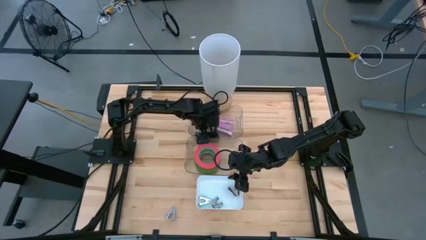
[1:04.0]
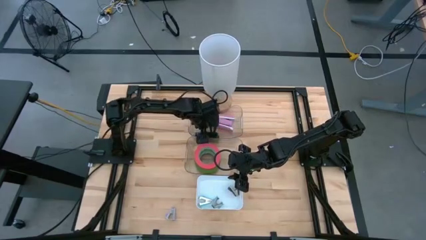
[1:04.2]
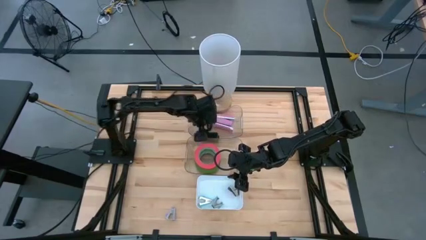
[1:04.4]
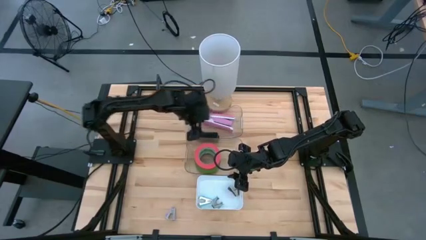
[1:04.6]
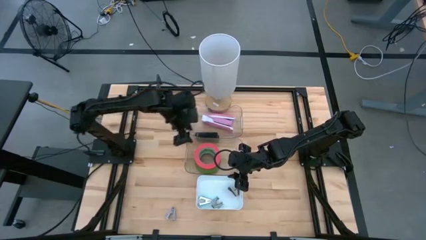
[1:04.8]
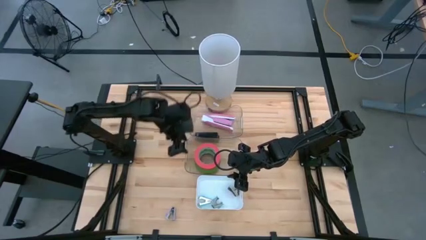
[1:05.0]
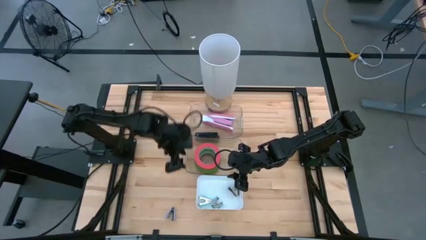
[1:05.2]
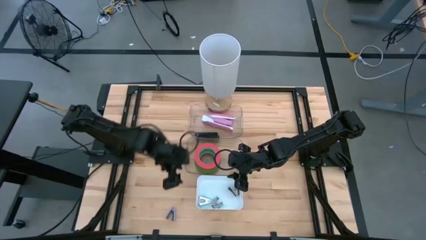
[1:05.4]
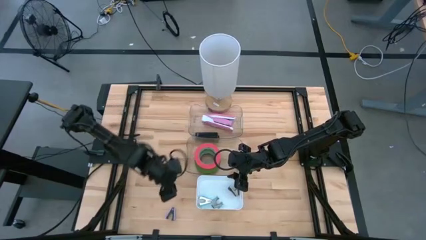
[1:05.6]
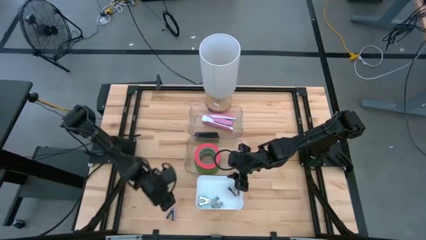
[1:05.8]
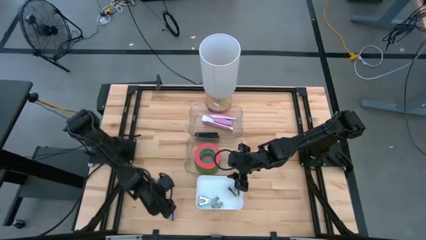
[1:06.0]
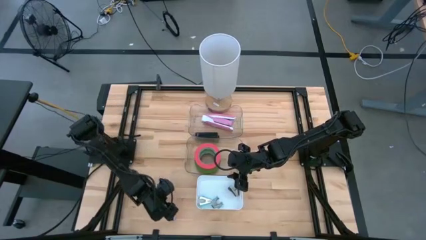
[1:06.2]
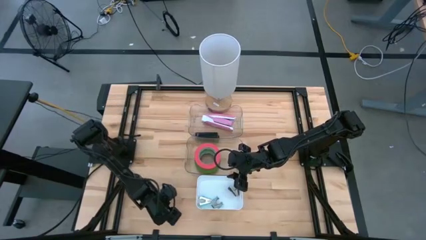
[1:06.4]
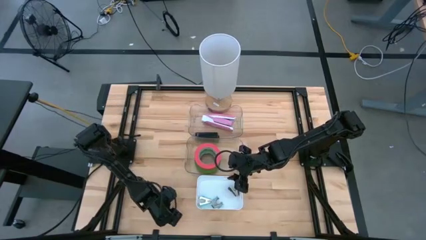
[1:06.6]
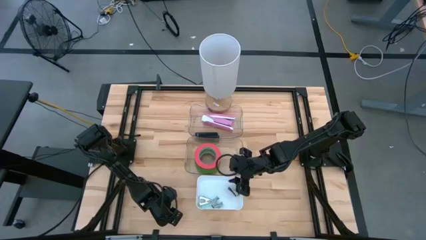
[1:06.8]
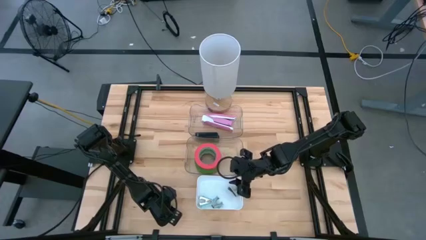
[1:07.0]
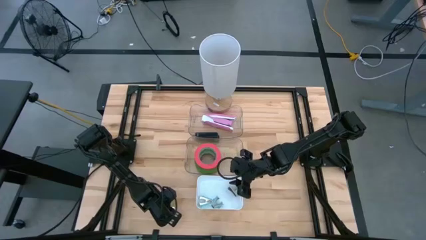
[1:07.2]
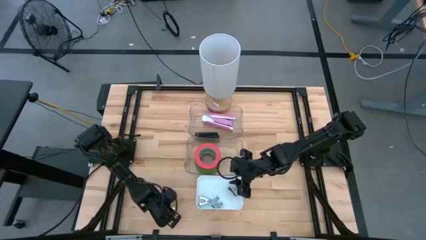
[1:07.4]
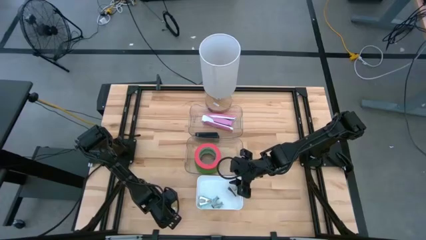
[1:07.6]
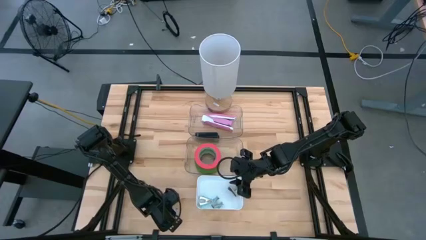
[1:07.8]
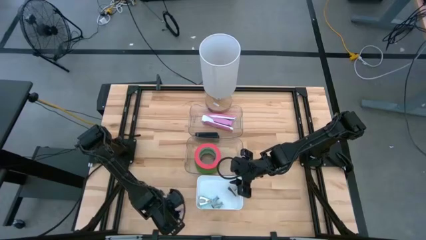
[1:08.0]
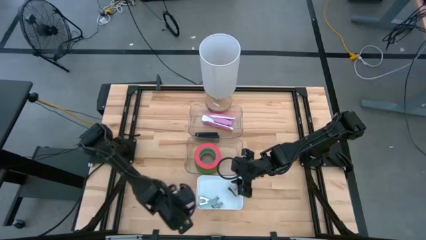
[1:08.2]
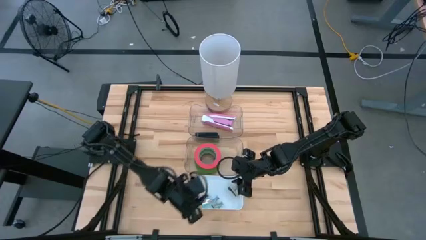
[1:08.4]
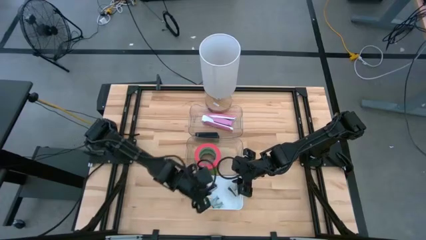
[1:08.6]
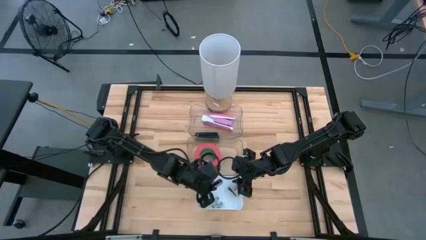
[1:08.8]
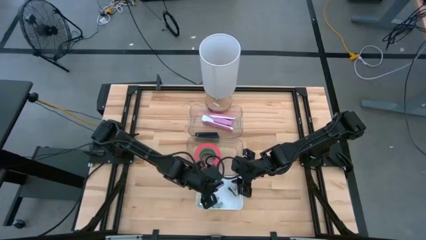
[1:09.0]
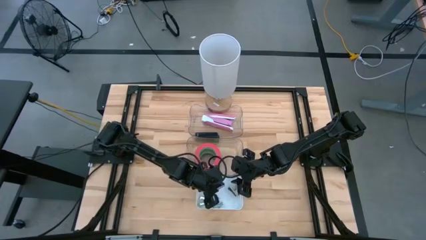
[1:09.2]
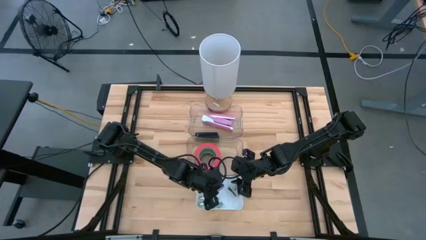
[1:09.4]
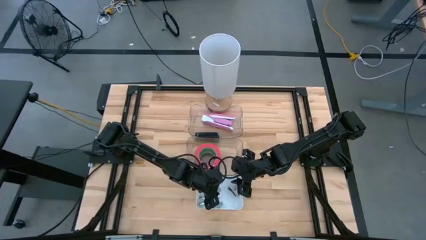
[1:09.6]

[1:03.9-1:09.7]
Task: Pick and place Stapler, Stapler remover, tape
Put the purple staple remover into the white bin

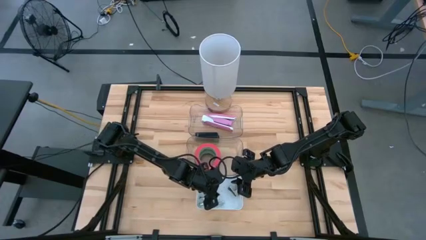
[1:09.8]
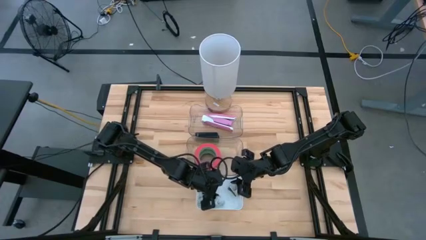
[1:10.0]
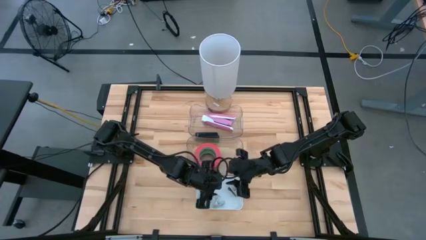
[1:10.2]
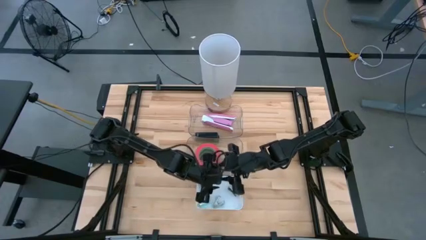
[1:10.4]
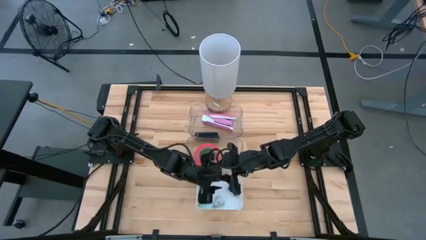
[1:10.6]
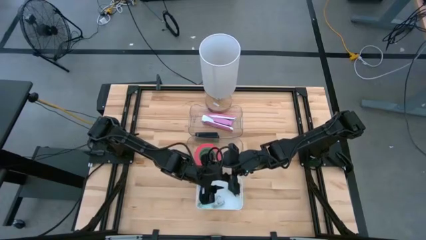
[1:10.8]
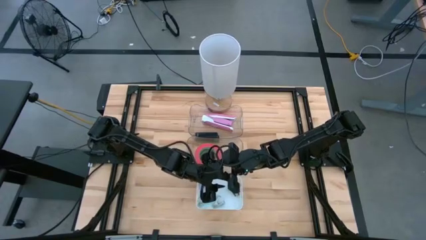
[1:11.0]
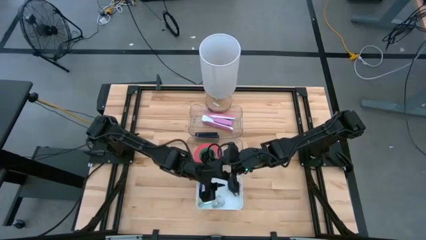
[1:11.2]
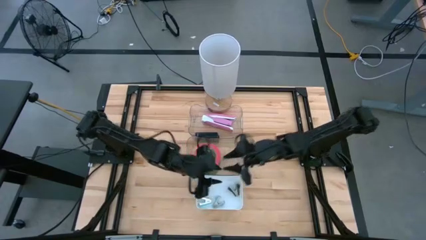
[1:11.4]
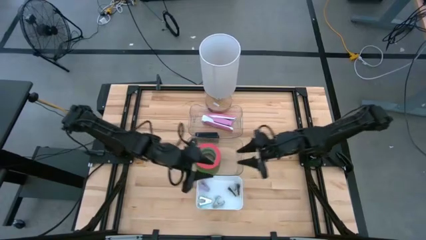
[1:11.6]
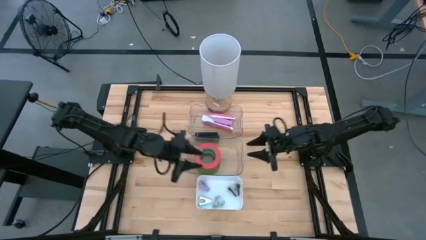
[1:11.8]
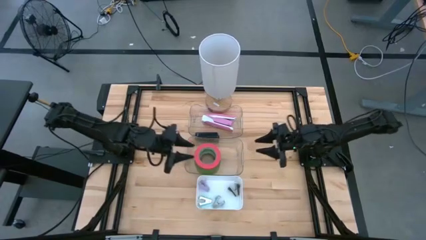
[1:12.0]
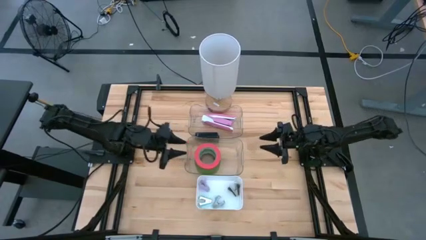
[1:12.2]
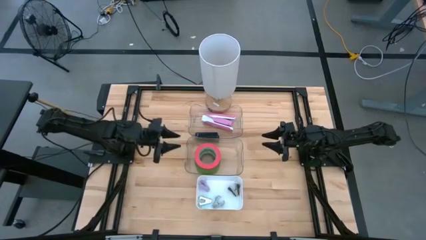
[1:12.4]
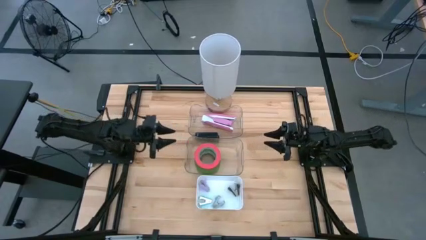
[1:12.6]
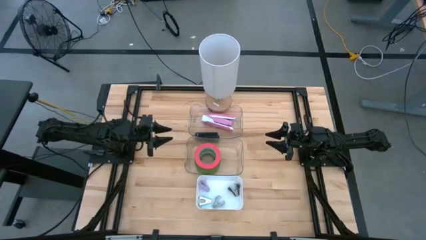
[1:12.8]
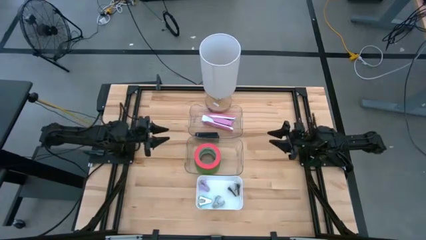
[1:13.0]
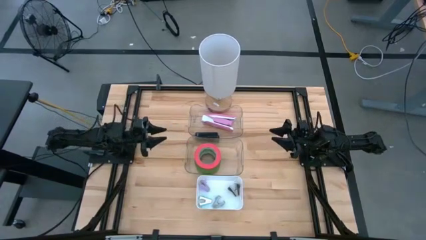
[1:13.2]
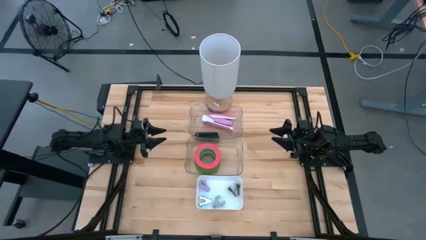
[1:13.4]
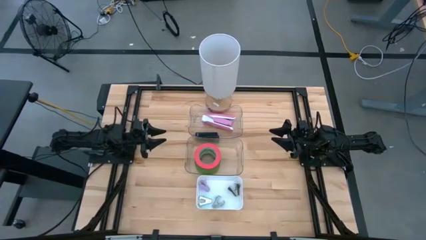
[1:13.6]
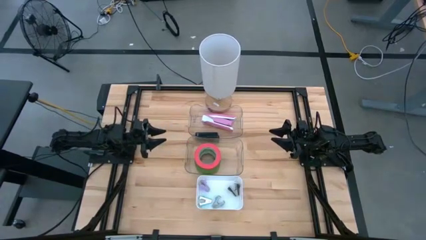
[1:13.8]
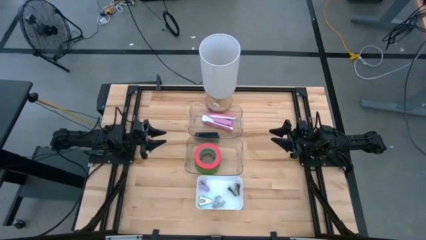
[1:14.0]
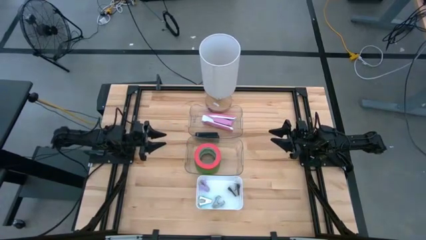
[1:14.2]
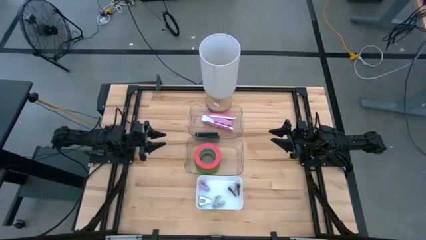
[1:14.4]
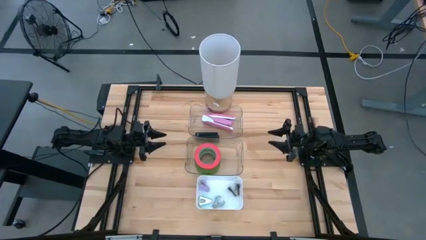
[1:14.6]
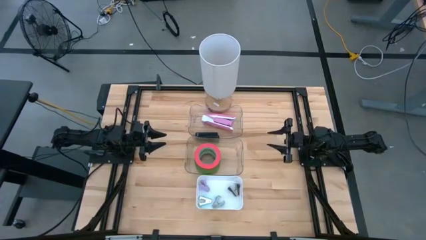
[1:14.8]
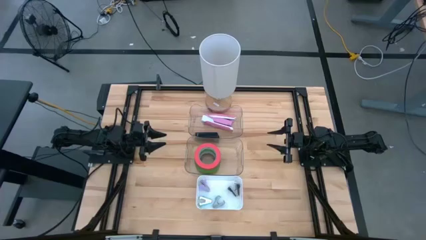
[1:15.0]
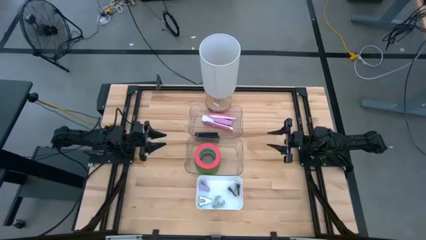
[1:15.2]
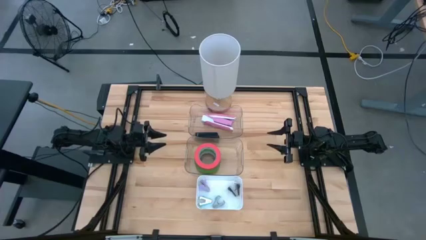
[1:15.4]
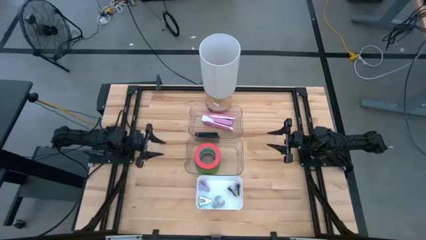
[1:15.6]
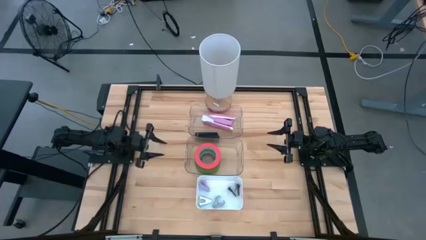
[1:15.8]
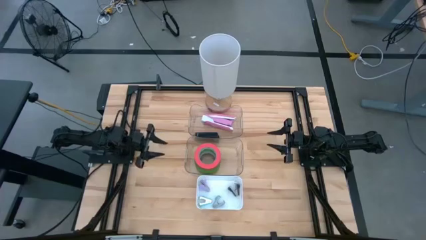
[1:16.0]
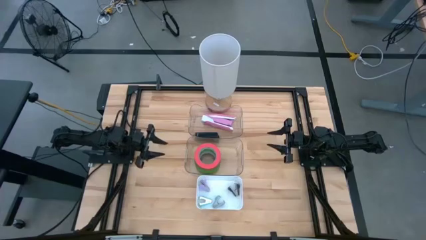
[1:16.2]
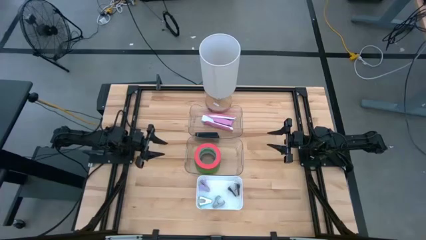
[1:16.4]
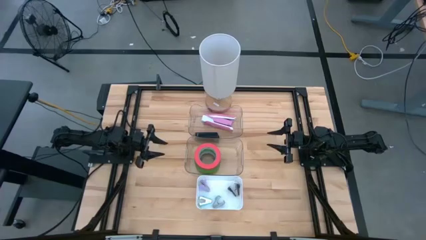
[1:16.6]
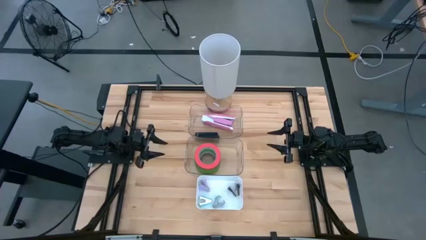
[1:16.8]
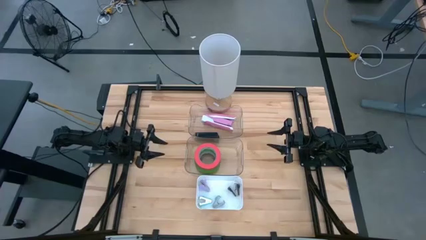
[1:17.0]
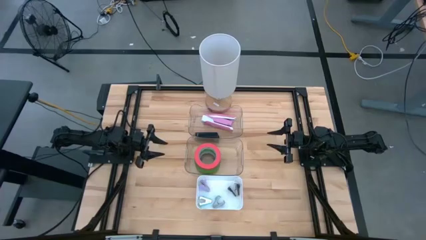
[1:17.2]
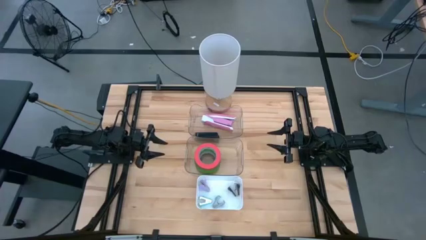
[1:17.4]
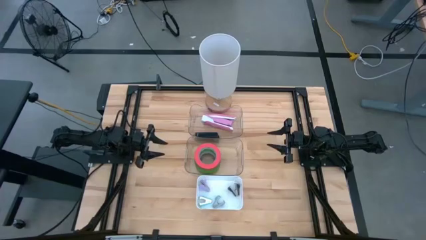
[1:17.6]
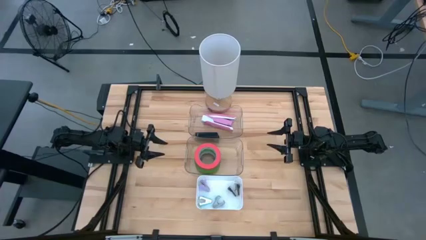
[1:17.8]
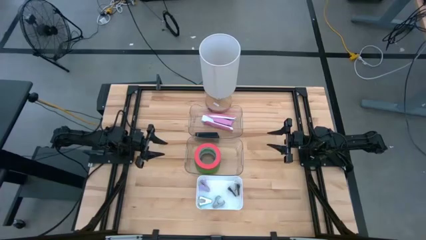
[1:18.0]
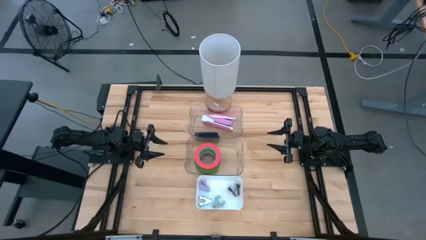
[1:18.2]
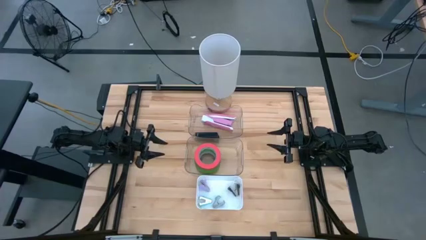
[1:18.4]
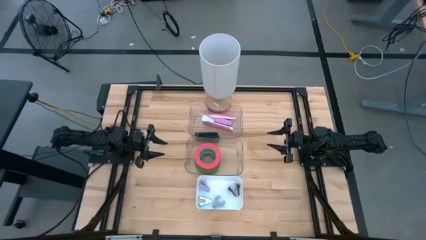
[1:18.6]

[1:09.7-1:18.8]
Return to Home Position
